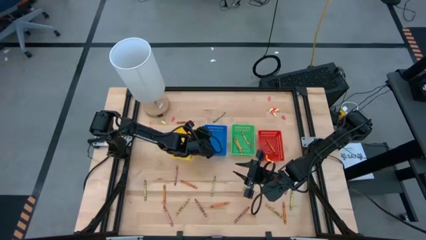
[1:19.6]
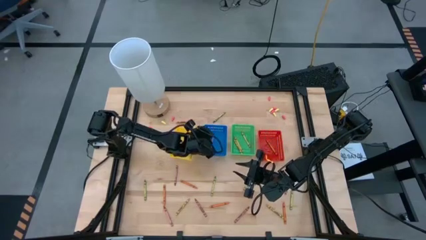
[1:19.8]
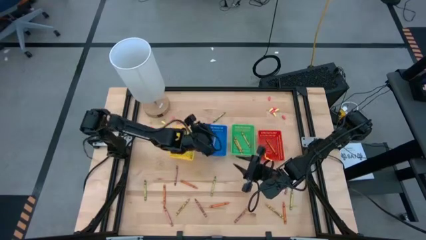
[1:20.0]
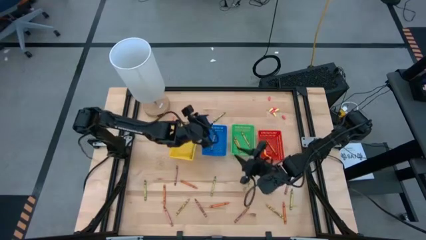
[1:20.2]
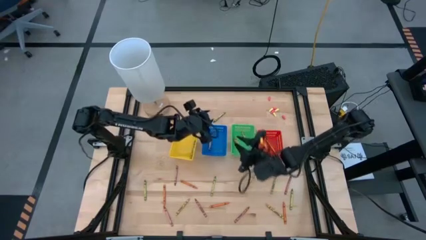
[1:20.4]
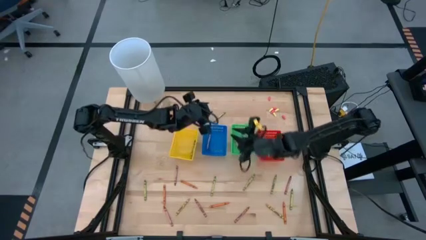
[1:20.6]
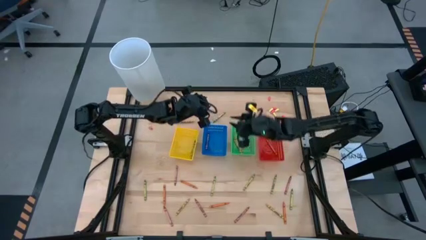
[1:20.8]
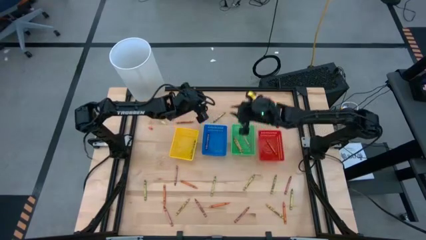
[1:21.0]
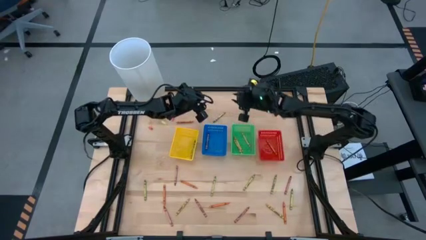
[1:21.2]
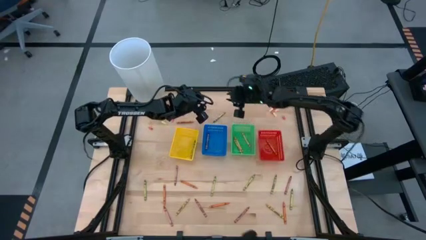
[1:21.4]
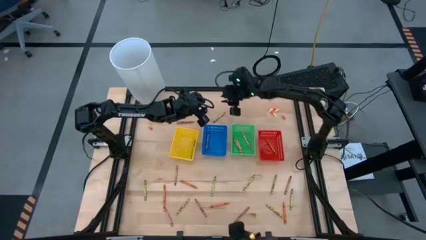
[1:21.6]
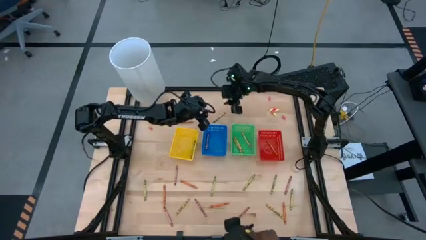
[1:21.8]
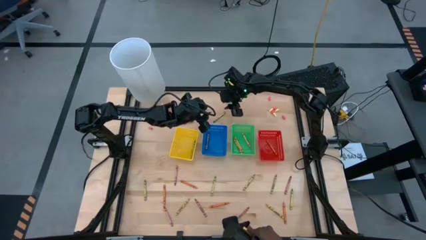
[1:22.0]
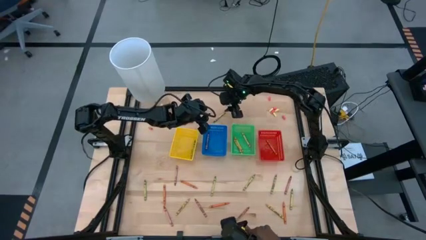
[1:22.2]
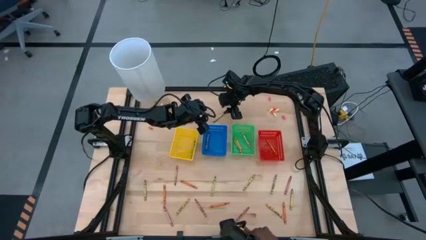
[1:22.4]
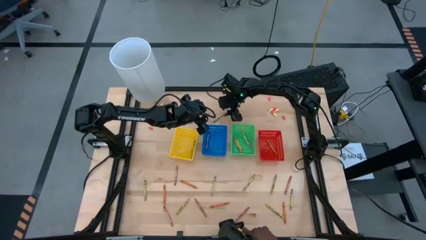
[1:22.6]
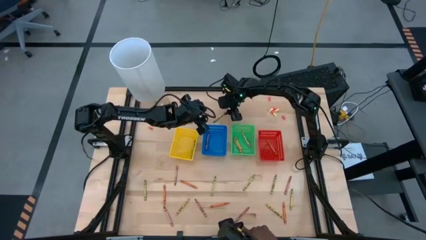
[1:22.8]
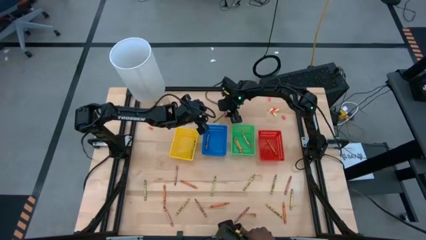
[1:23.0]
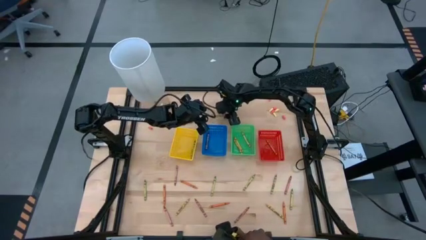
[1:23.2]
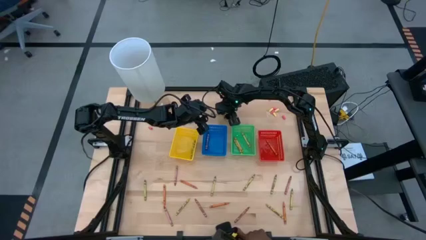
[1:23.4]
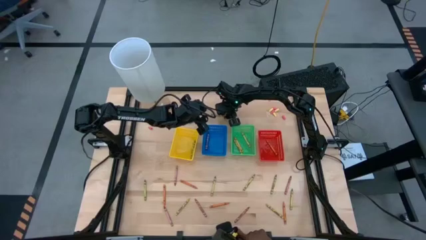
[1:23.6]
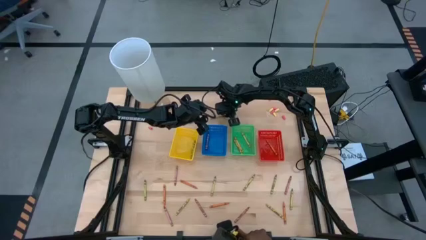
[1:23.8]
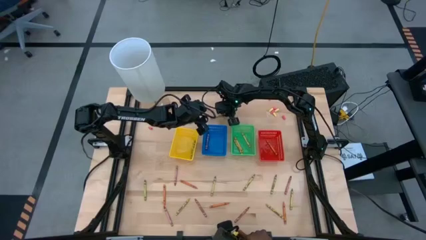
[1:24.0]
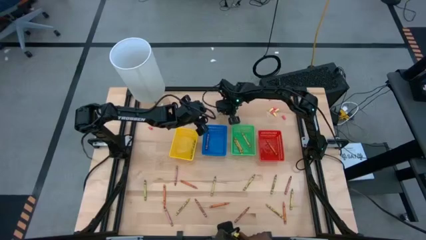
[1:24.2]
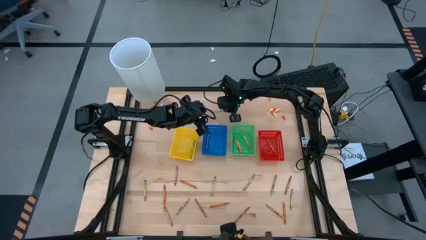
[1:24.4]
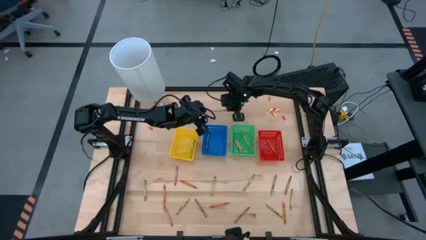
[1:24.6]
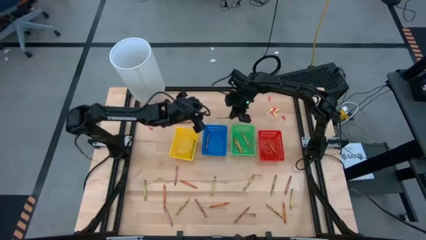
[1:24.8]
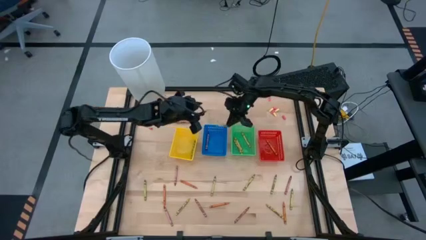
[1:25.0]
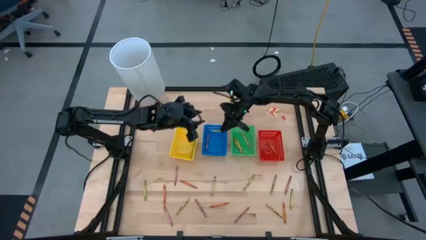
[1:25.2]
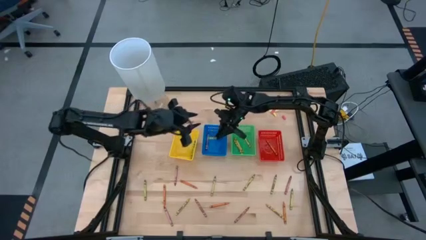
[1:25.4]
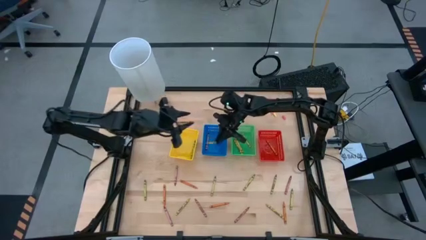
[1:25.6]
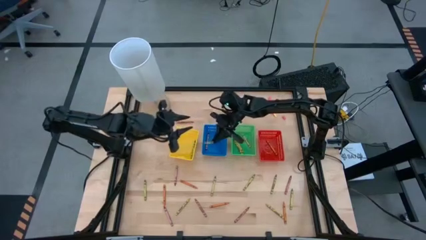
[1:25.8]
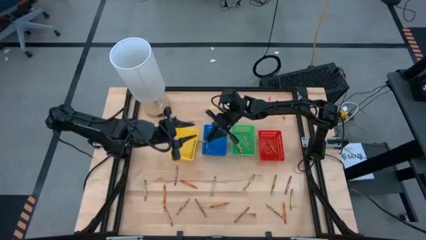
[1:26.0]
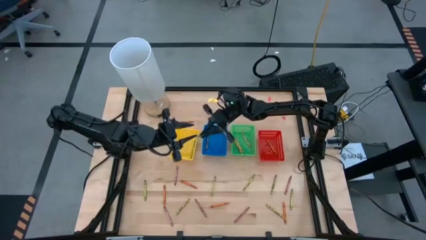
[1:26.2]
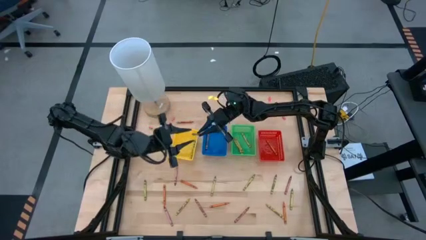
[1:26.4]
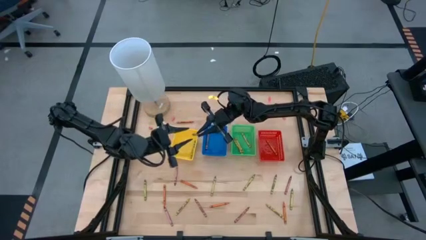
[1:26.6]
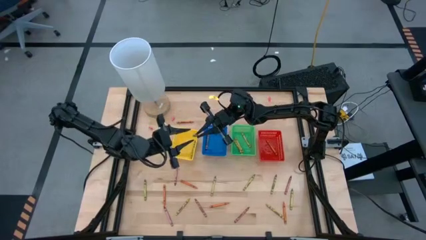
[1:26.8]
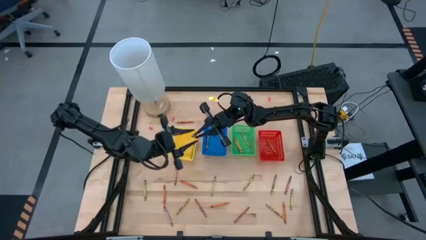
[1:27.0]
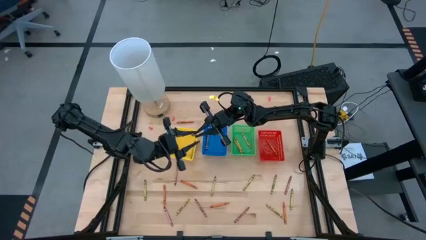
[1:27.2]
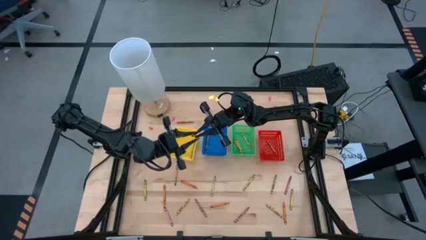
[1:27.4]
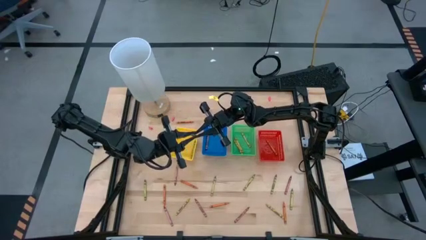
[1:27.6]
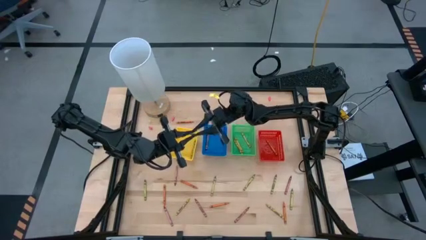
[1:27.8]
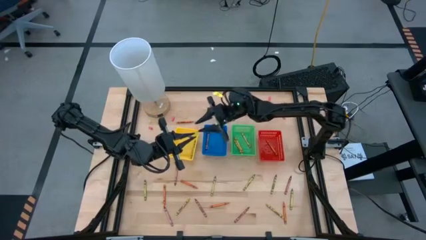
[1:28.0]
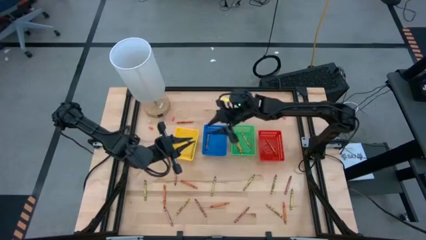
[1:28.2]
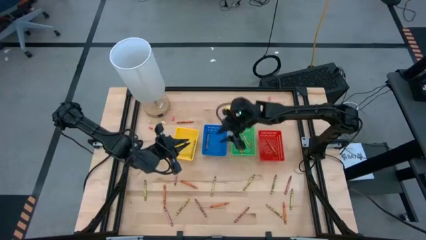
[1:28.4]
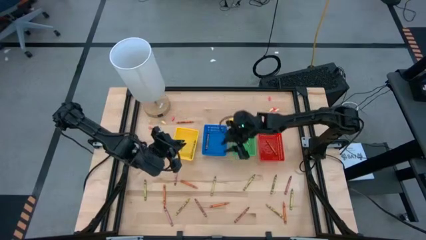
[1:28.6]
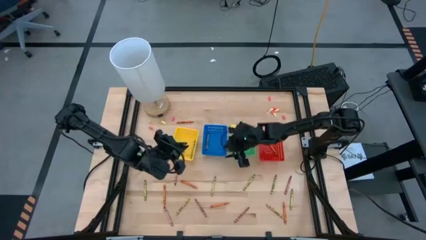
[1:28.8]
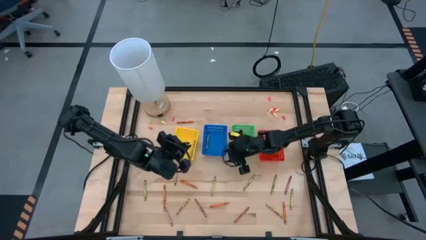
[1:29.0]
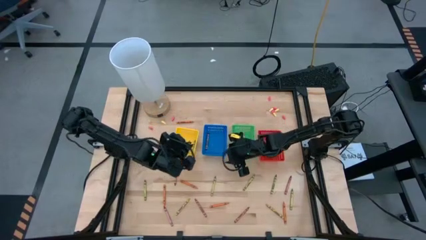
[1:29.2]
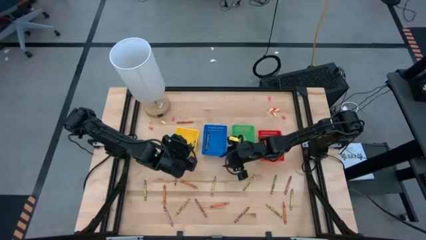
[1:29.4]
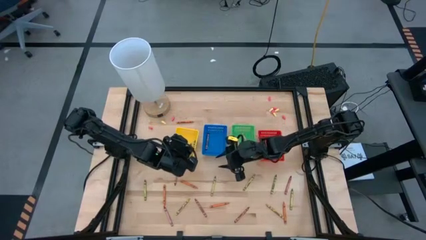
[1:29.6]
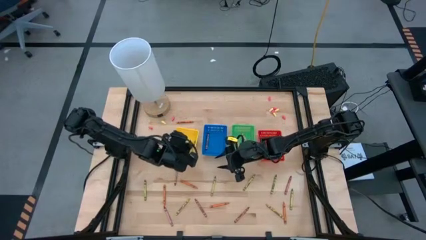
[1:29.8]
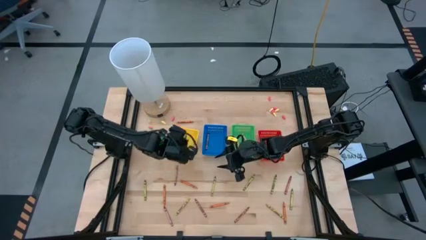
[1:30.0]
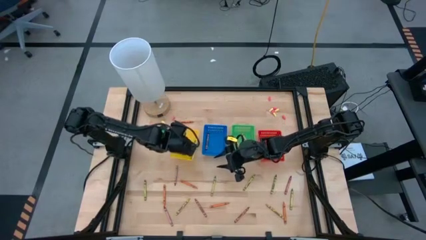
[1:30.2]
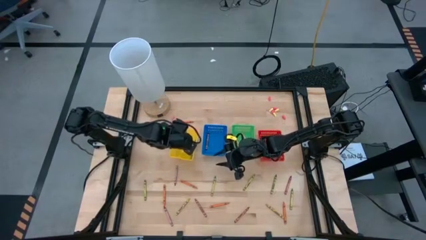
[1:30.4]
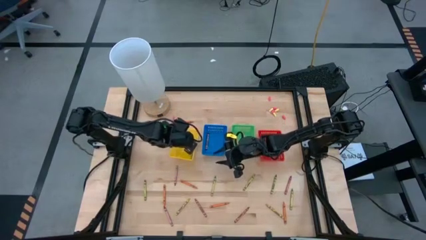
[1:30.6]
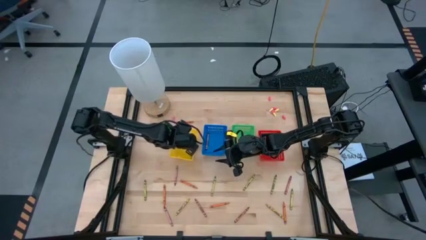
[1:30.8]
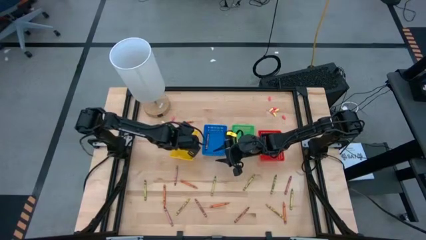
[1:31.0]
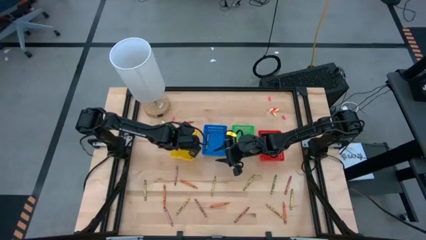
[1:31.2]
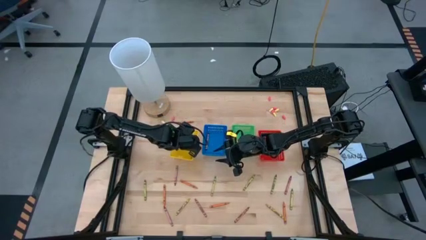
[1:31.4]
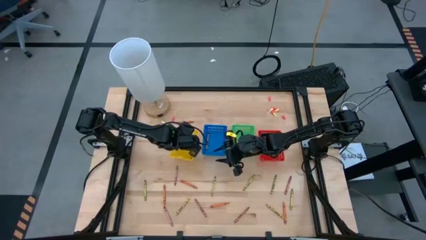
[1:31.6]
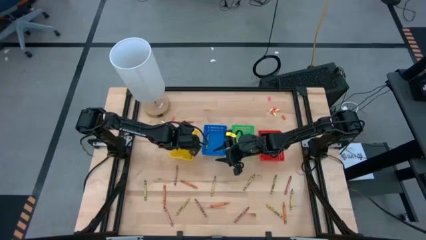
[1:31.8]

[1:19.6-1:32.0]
Task: Sort crayons
Put the green crayon into the yellow bin

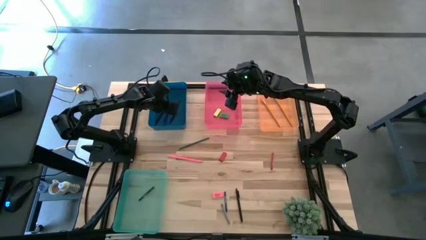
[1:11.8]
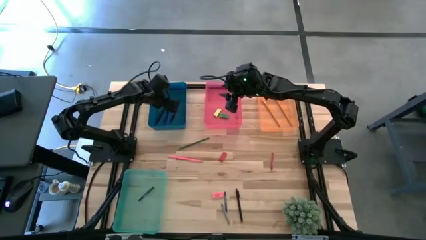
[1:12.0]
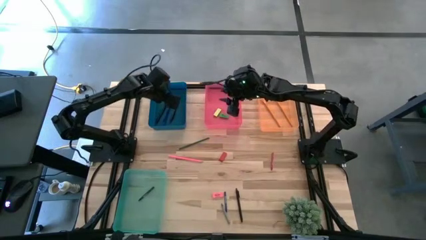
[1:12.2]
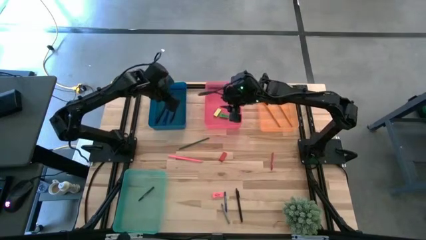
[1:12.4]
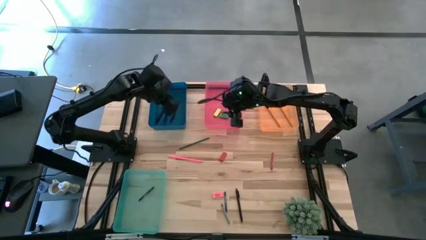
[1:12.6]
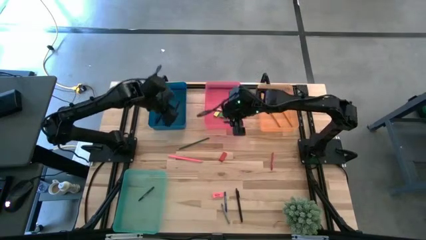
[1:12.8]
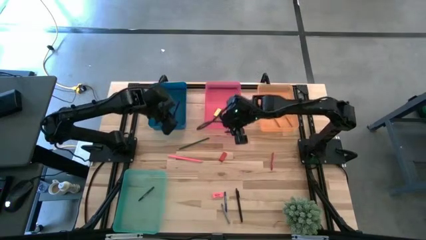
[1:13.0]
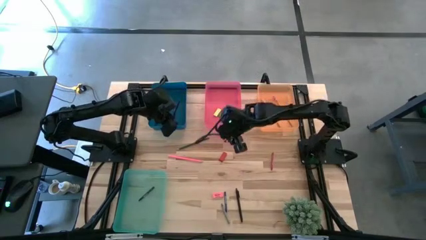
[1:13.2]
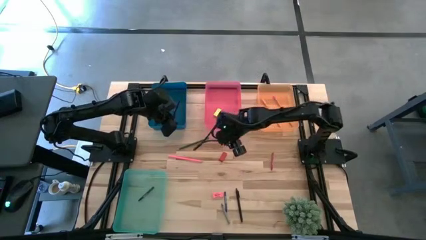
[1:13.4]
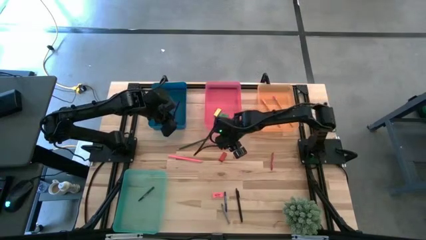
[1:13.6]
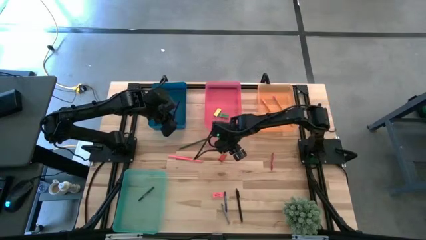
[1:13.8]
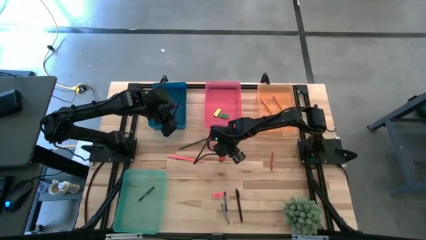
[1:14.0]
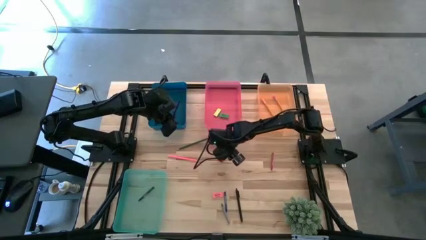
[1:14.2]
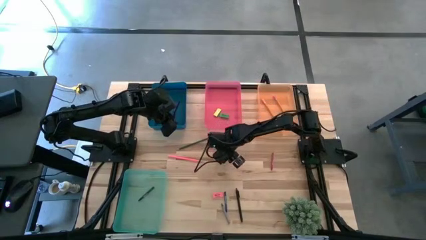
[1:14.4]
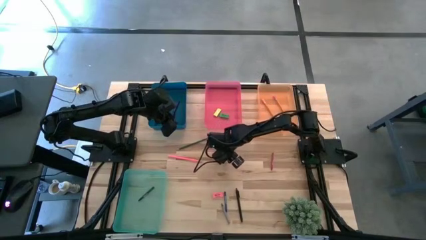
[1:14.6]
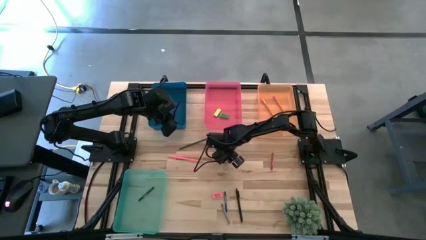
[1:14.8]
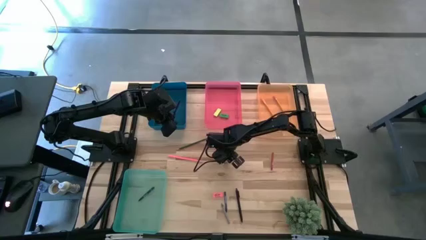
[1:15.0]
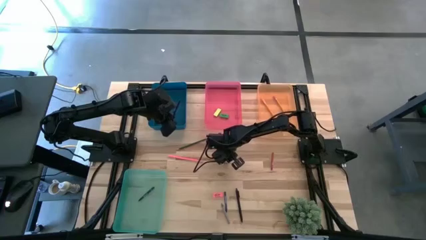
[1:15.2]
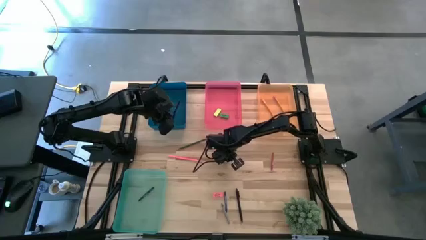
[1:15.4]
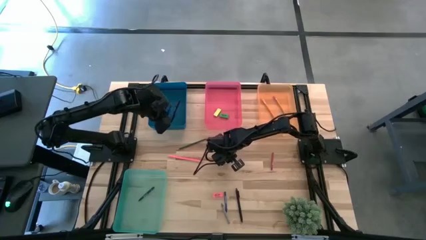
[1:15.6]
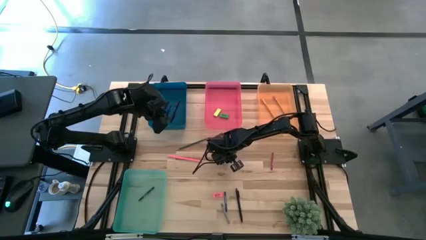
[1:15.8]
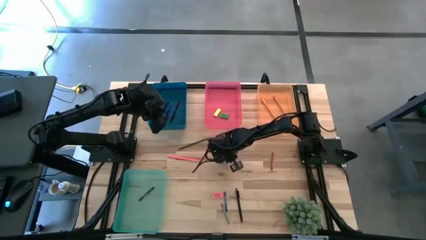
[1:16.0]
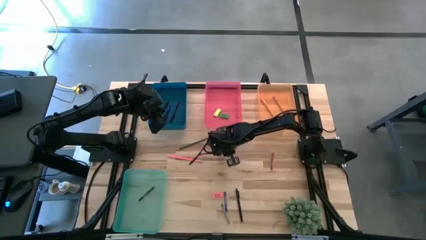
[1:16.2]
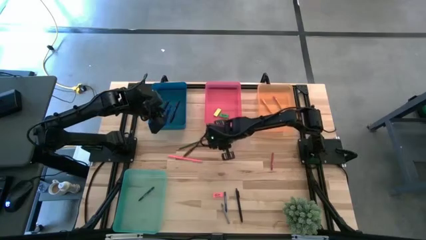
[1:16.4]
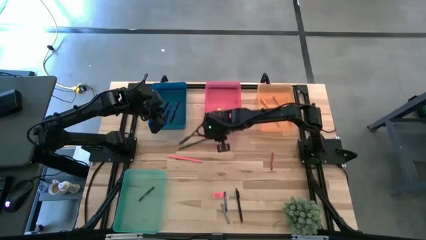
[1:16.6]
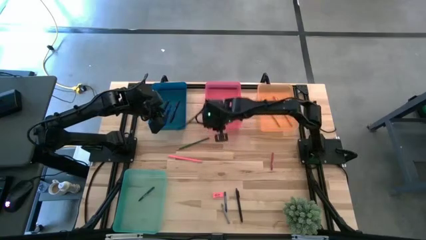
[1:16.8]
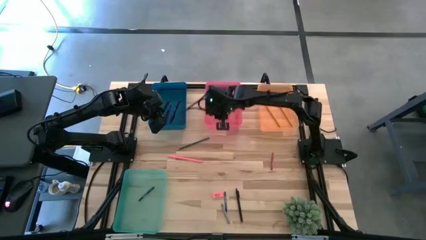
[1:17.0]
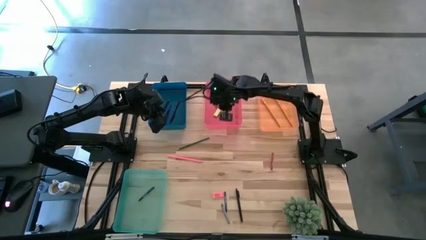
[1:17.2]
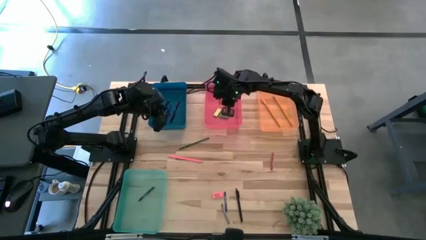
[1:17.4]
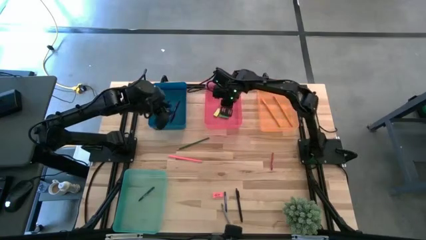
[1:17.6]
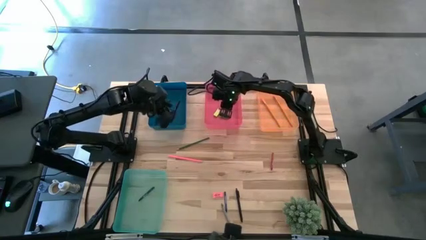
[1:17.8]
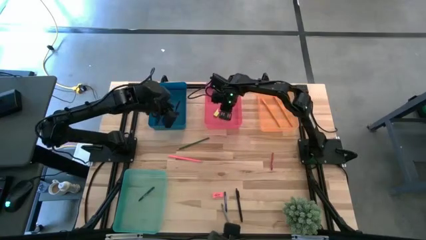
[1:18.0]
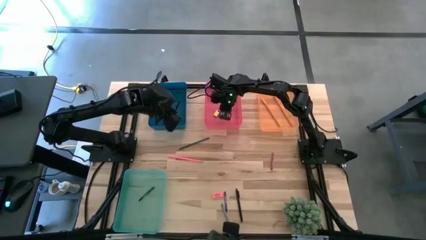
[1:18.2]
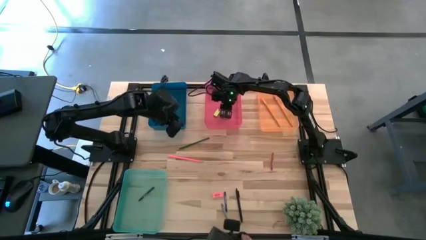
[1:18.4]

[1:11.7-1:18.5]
Task: Sort crayons/erasers/pens/pencils in bins
Put the orange eraser into the pink bin
